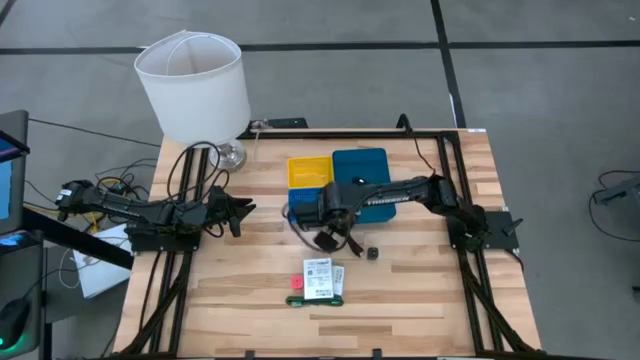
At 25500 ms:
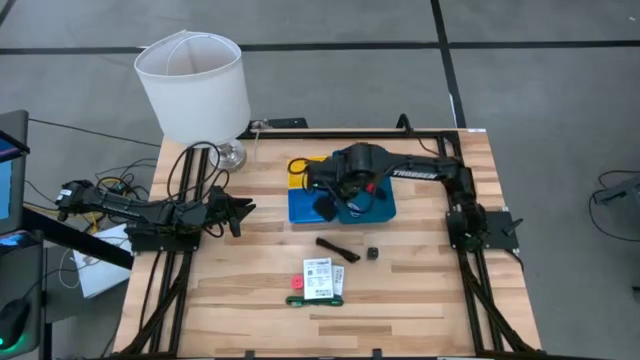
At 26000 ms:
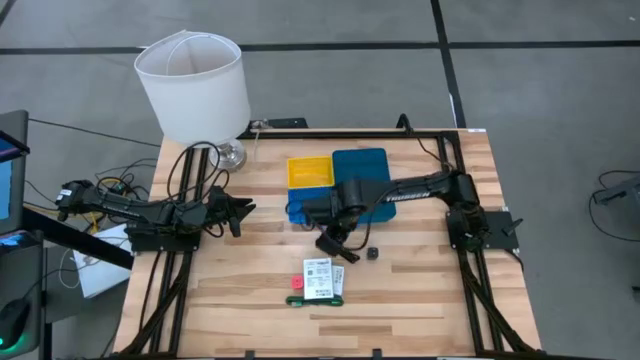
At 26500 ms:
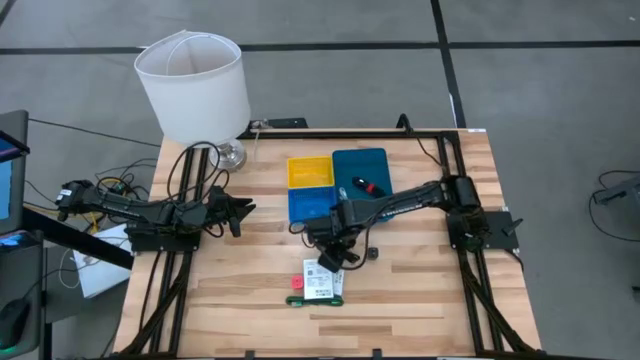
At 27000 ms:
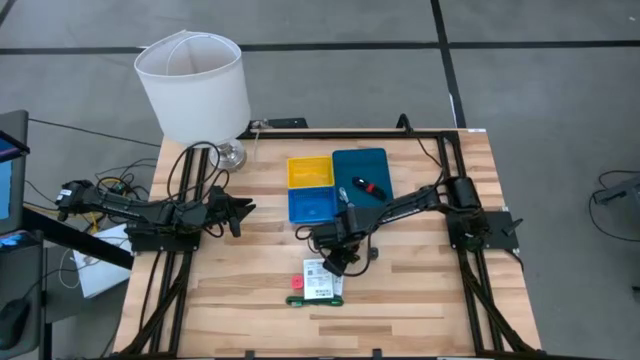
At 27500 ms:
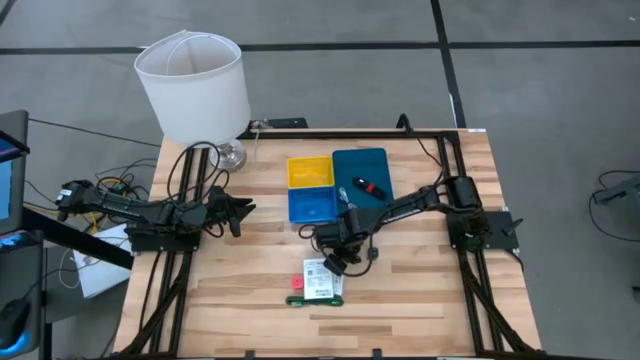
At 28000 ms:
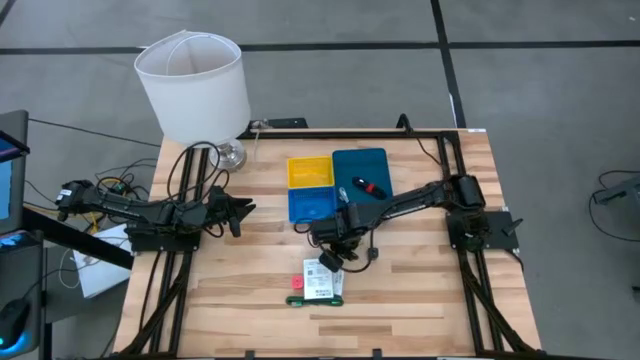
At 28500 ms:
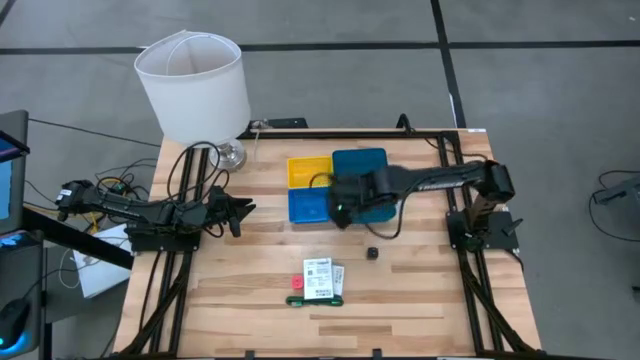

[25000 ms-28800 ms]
Task: Pick and place items into bin
Put the black charger cable in the dark blue bin

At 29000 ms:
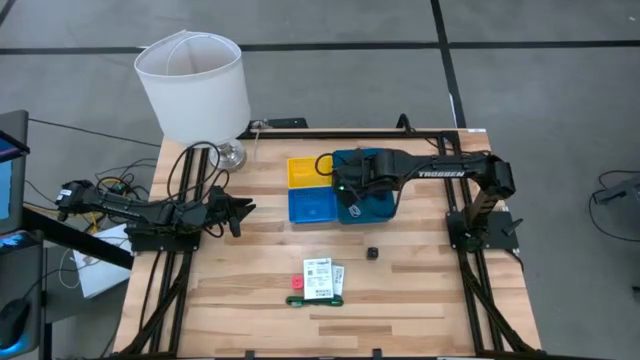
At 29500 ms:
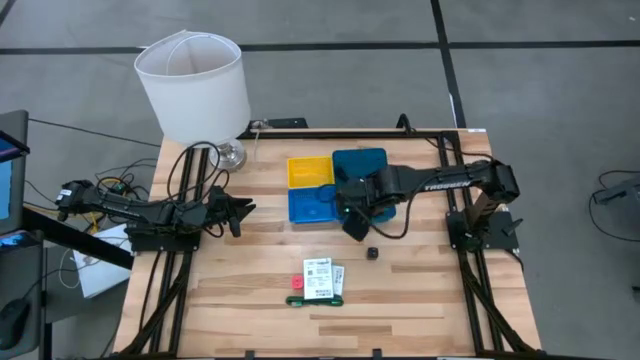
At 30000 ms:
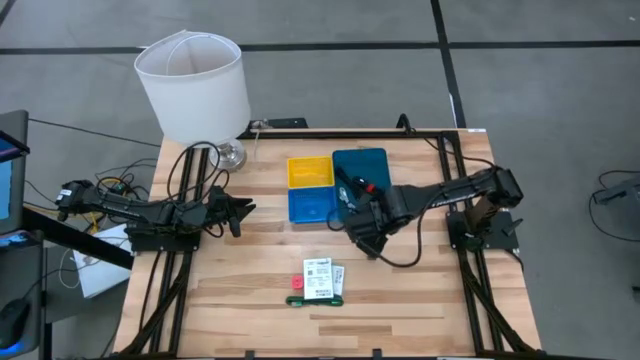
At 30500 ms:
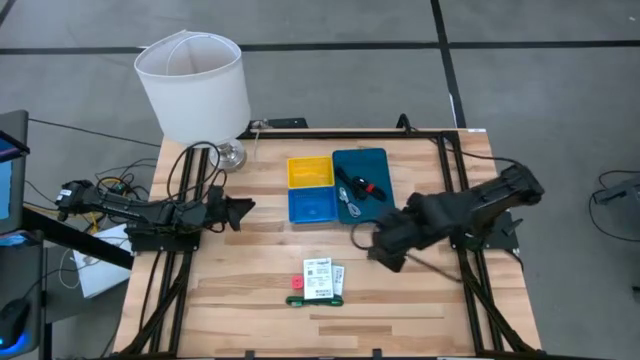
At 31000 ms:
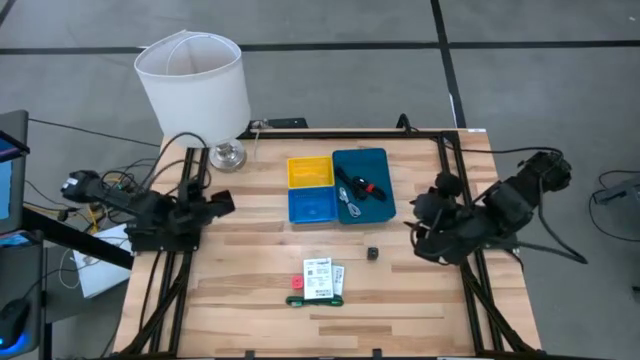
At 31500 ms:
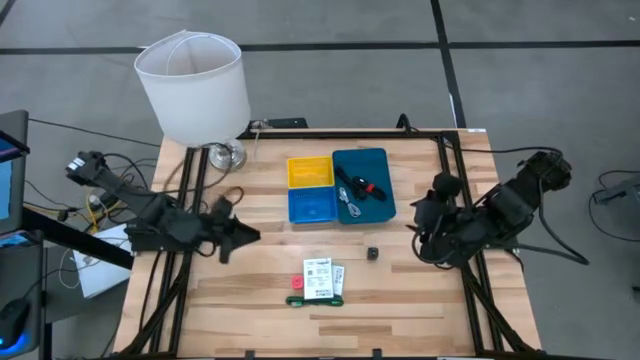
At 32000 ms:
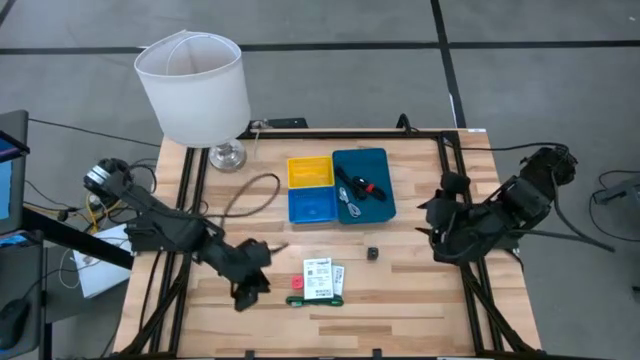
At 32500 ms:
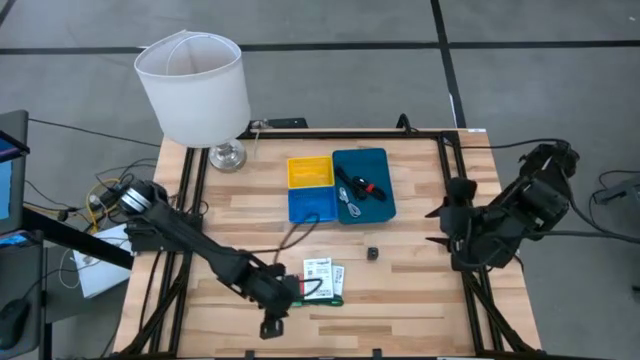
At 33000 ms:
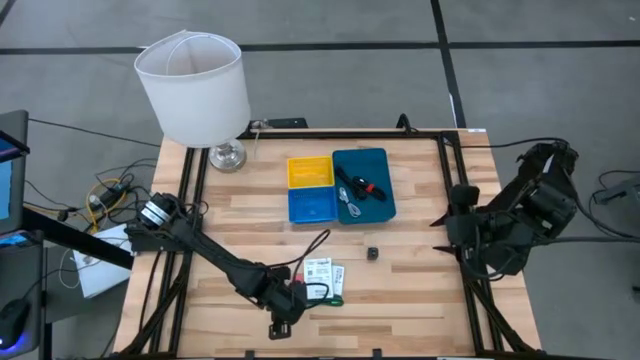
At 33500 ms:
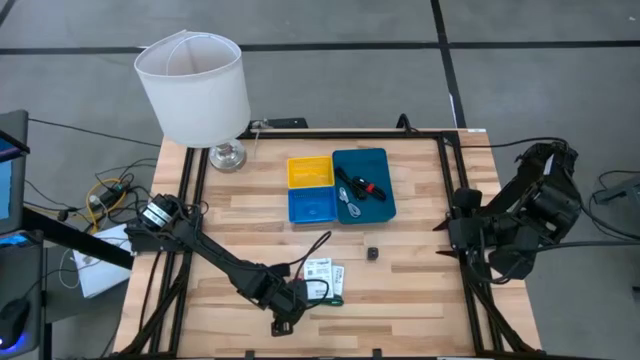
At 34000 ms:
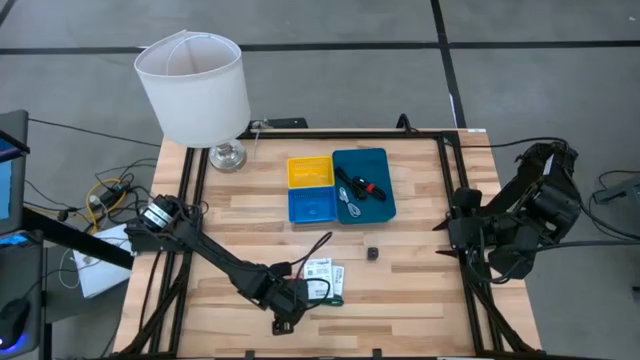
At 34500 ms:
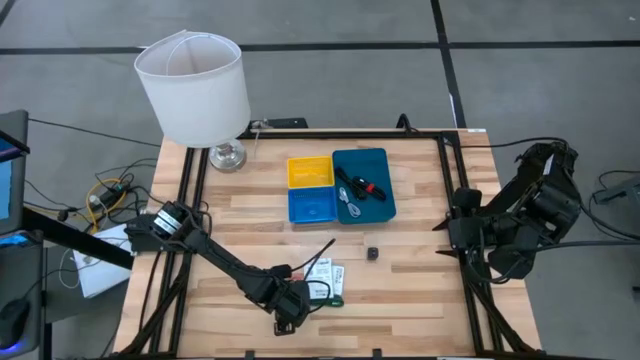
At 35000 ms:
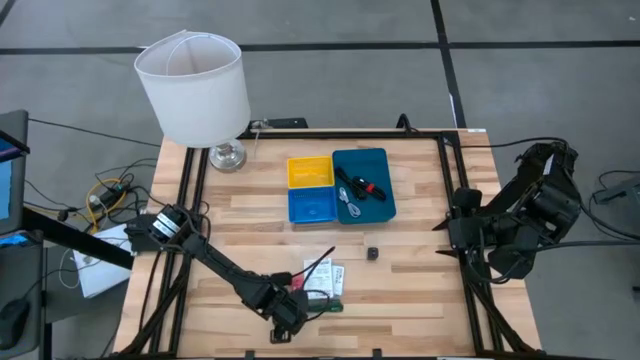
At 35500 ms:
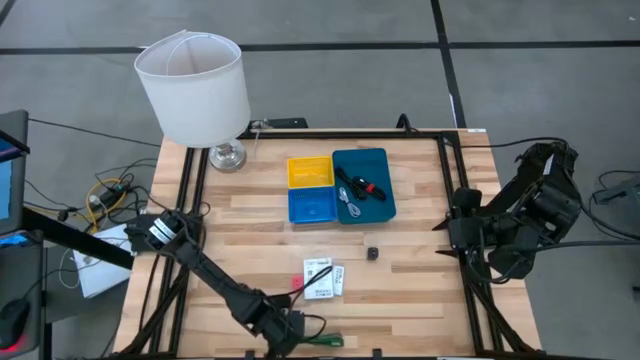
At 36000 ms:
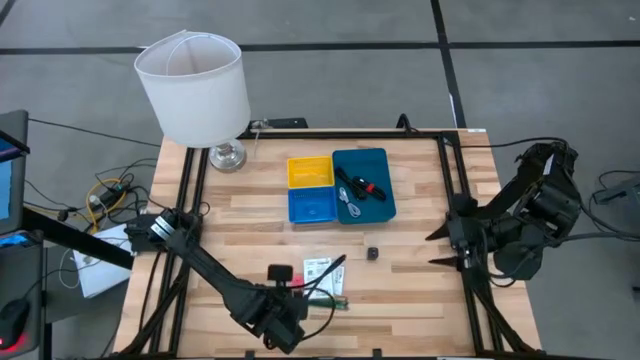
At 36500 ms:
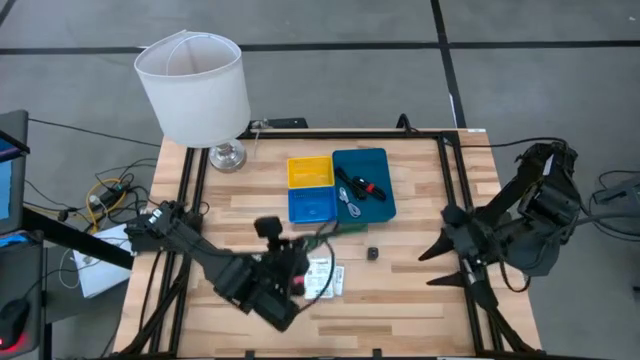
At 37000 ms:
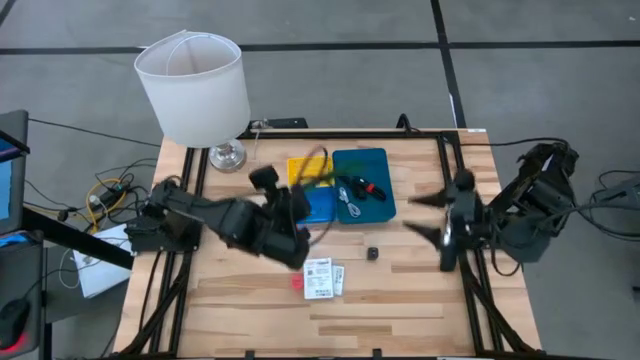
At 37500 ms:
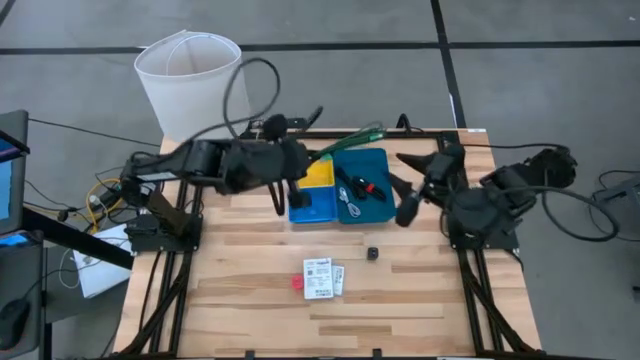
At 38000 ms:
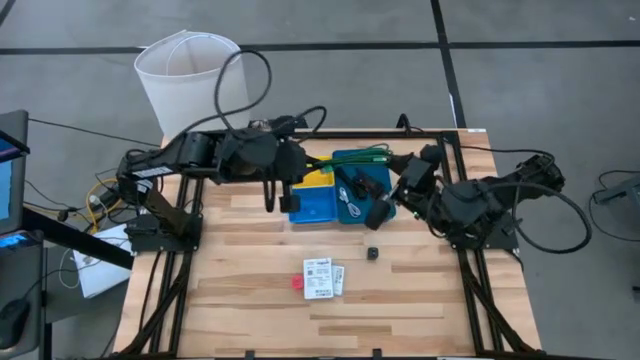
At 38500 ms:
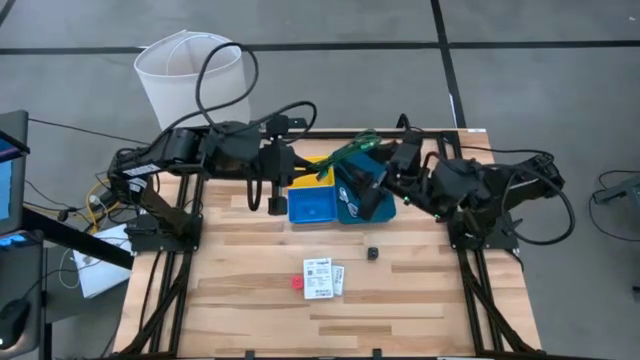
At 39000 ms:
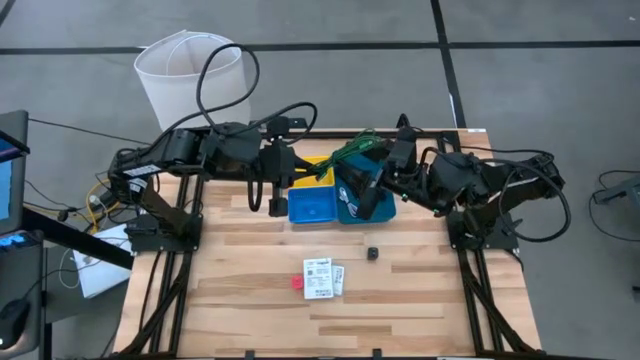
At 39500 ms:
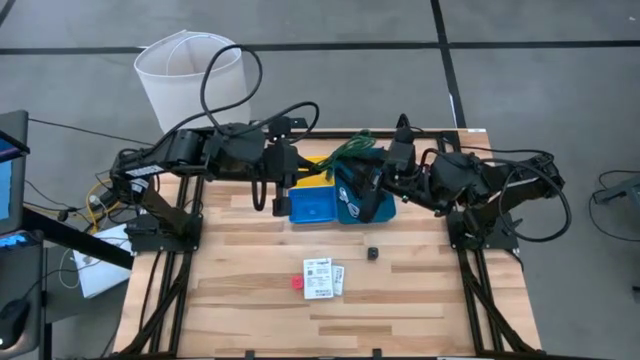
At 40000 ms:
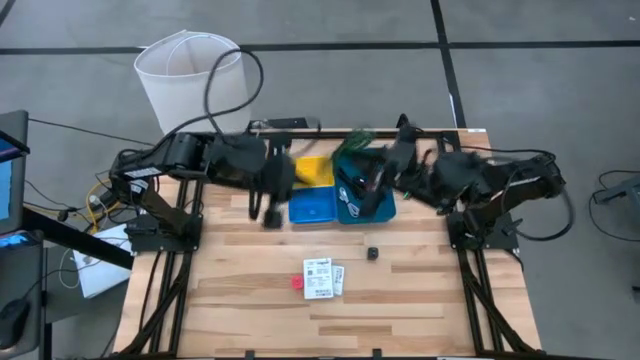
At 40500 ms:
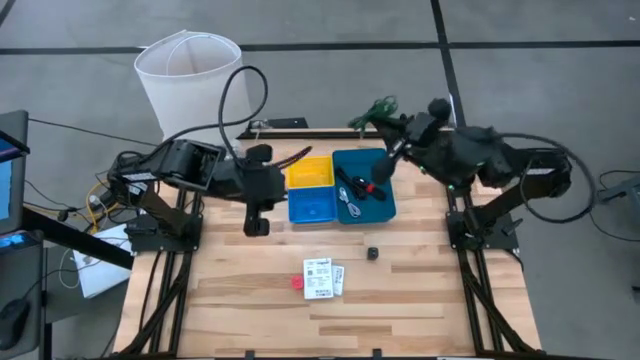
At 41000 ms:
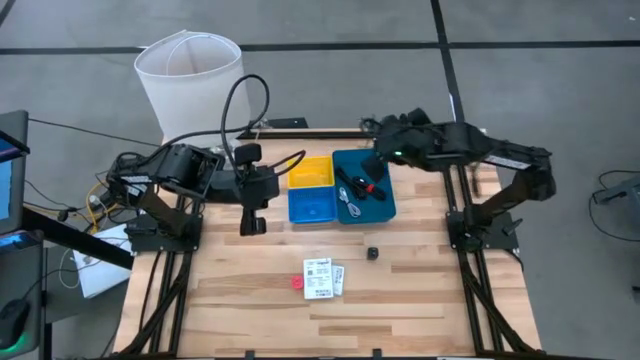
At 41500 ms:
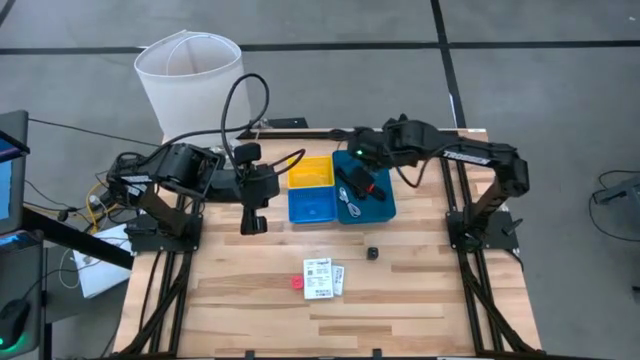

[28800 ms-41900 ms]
Put the green charger cable in the dark blue bin

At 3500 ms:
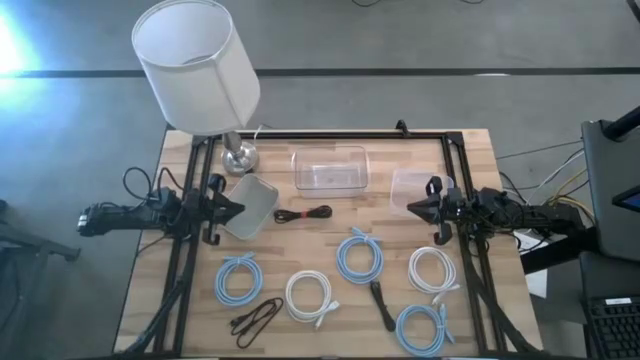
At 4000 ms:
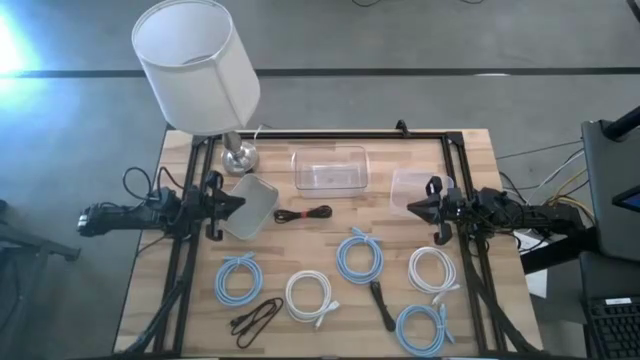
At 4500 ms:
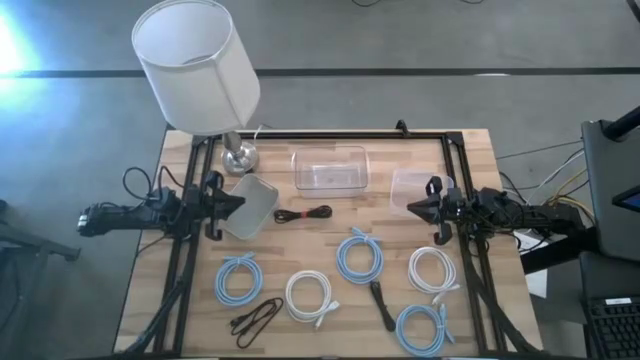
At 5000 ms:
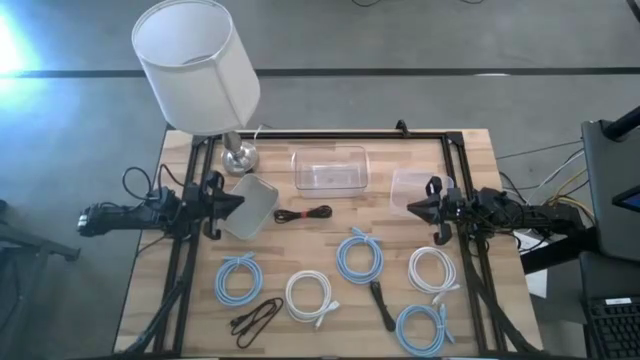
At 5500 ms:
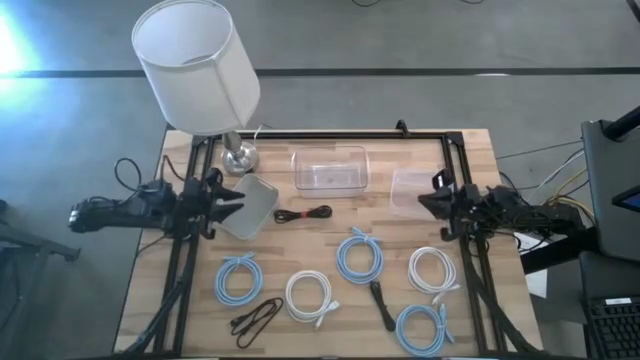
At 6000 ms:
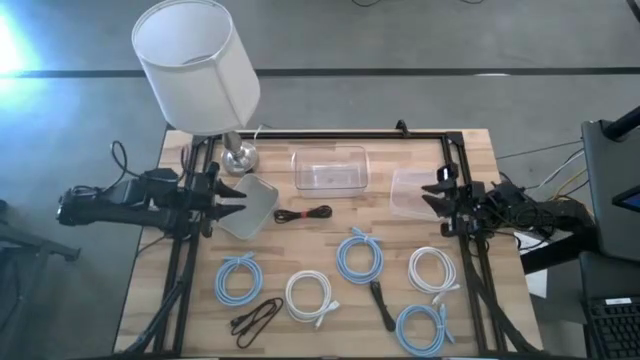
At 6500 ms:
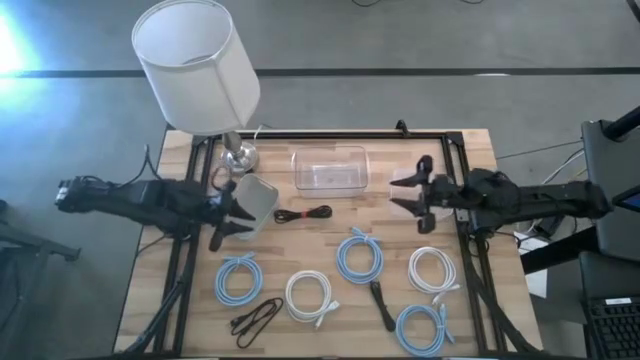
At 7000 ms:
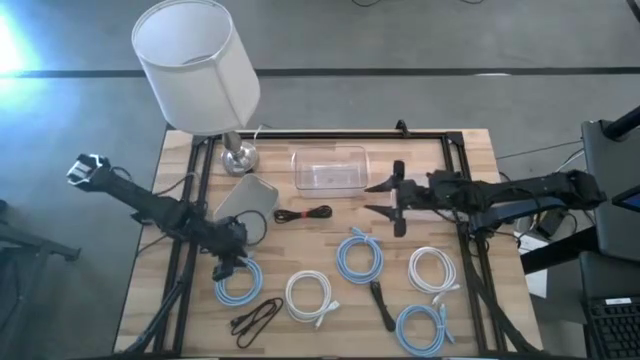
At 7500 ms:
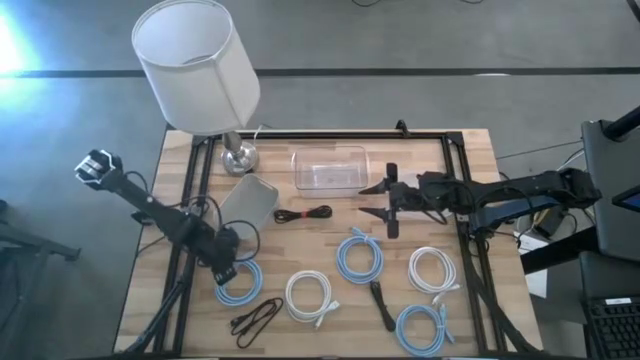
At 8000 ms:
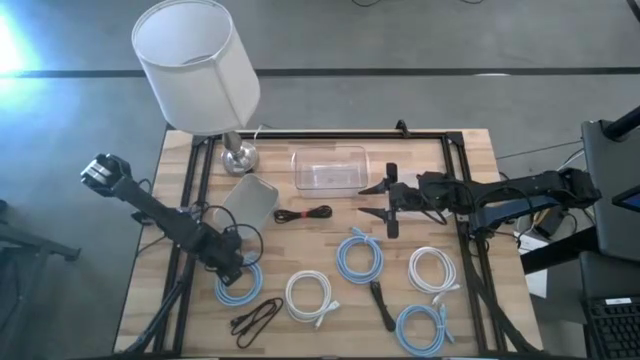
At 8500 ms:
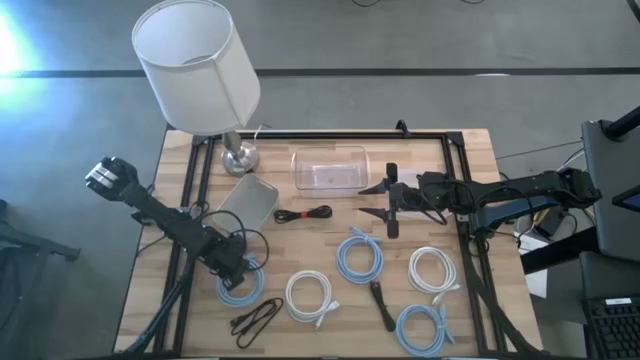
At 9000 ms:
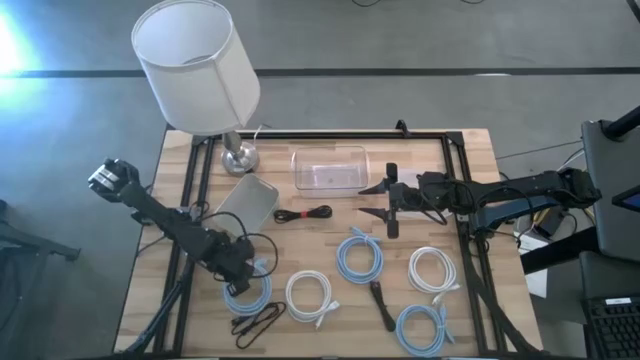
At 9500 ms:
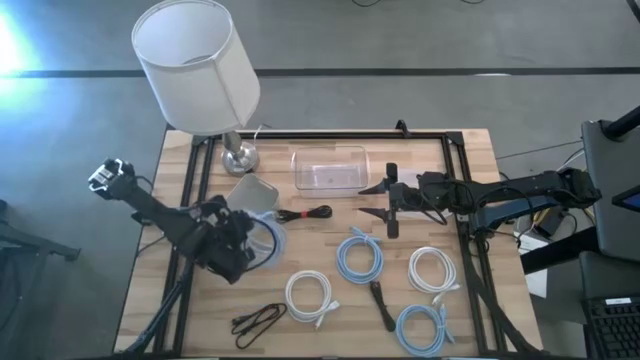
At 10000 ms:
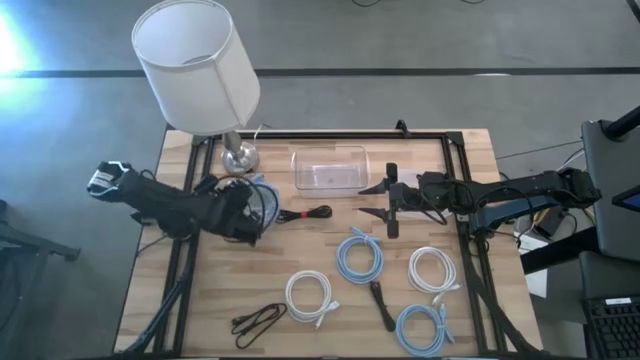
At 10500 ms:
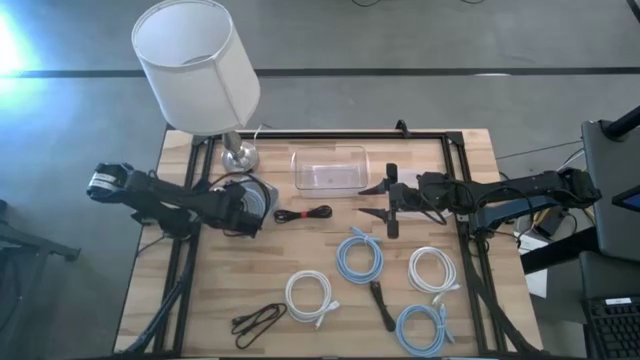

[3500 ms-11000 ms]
Task: Pick & Place USB Port
Put the left blue USB cable into the gray bin
